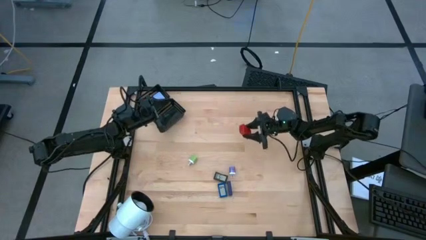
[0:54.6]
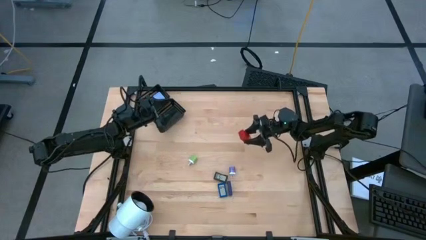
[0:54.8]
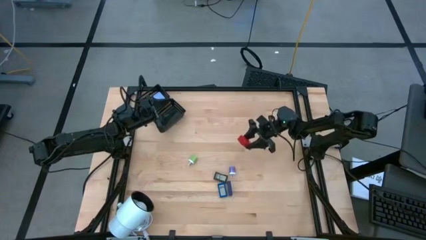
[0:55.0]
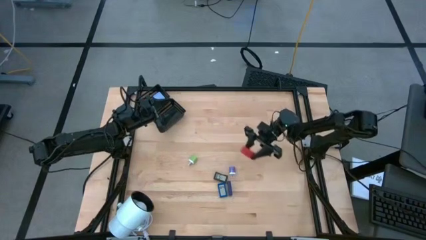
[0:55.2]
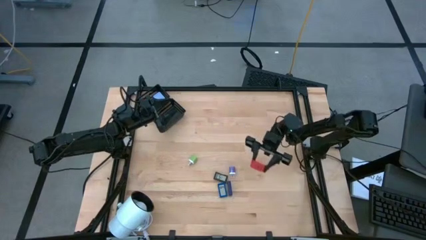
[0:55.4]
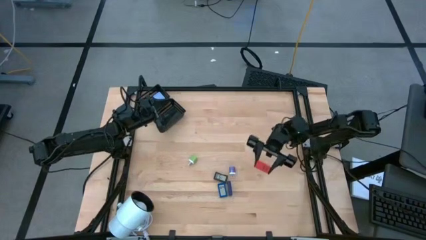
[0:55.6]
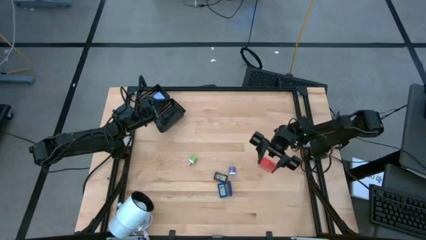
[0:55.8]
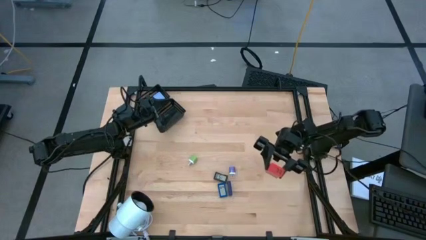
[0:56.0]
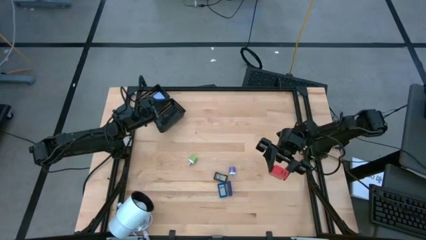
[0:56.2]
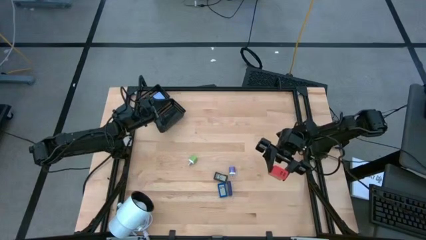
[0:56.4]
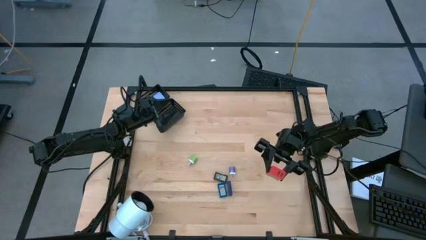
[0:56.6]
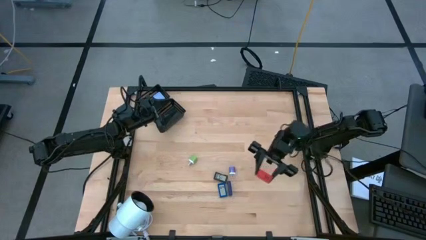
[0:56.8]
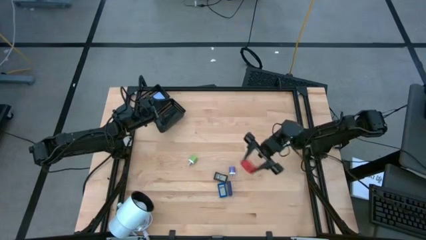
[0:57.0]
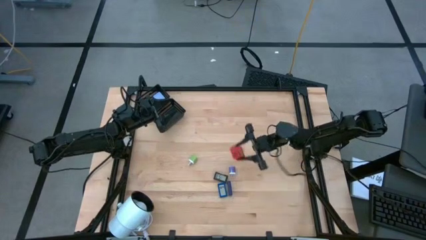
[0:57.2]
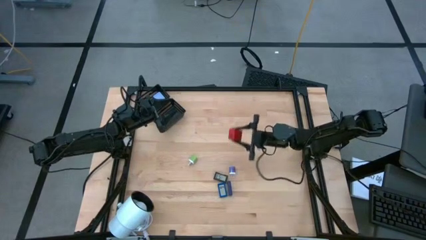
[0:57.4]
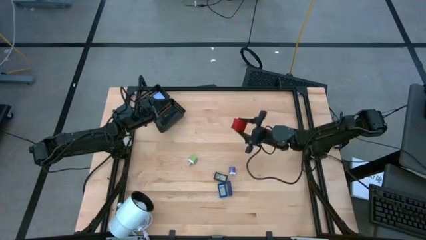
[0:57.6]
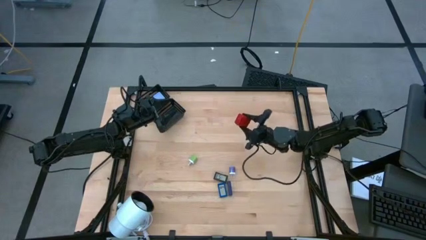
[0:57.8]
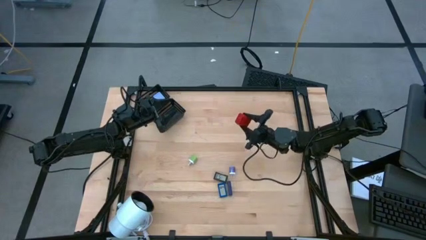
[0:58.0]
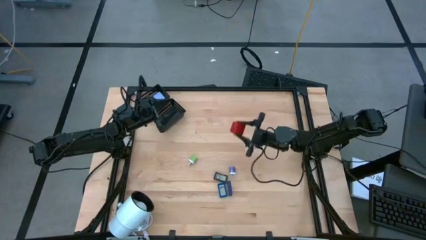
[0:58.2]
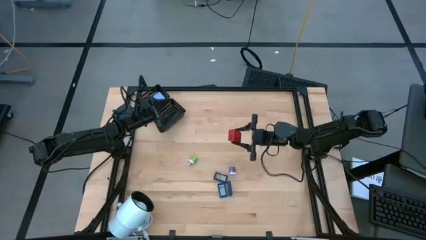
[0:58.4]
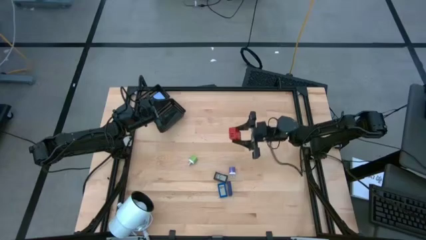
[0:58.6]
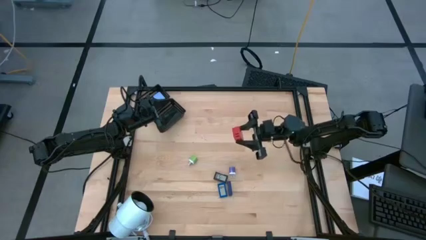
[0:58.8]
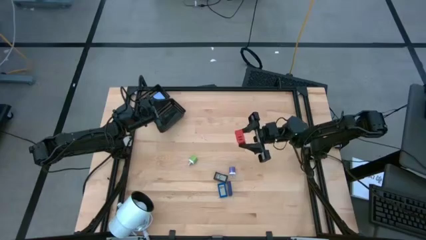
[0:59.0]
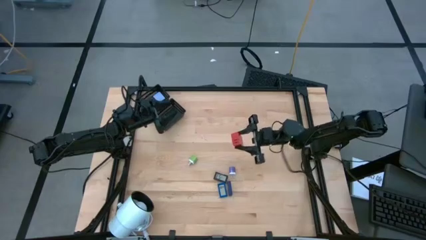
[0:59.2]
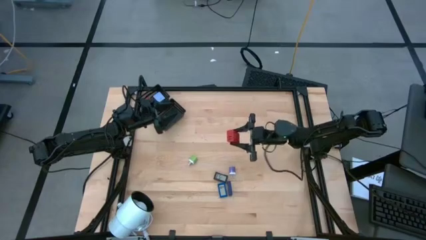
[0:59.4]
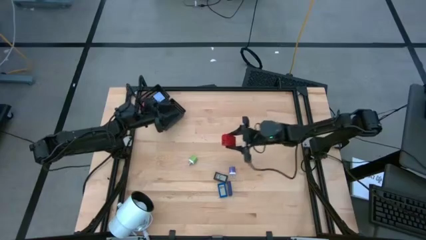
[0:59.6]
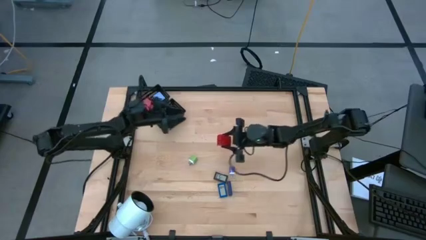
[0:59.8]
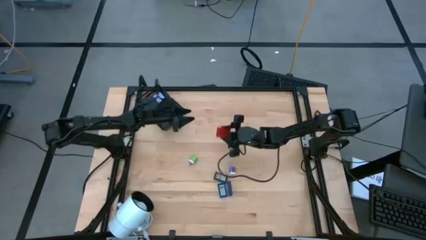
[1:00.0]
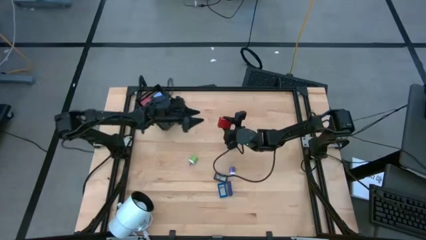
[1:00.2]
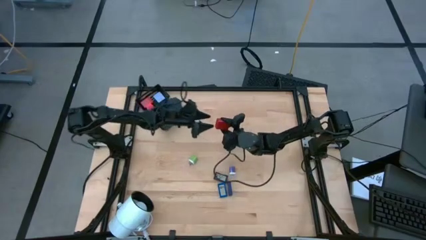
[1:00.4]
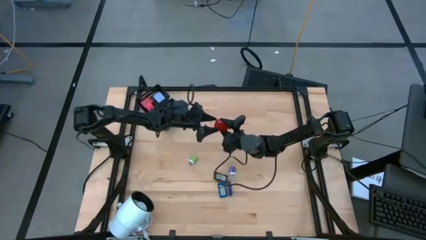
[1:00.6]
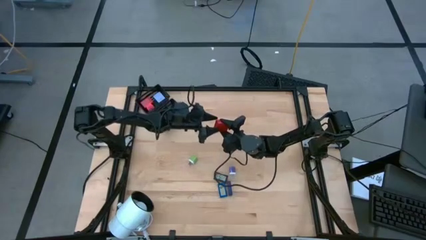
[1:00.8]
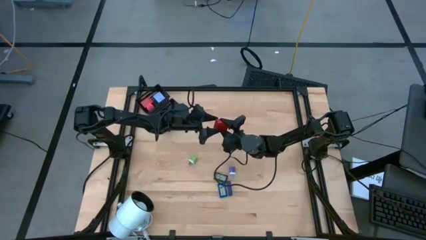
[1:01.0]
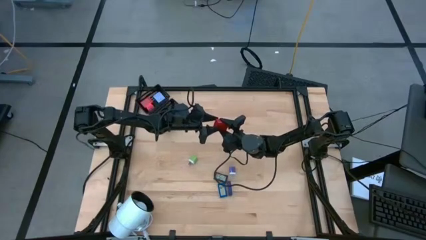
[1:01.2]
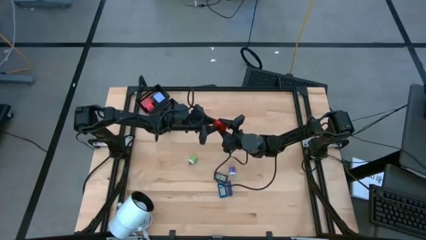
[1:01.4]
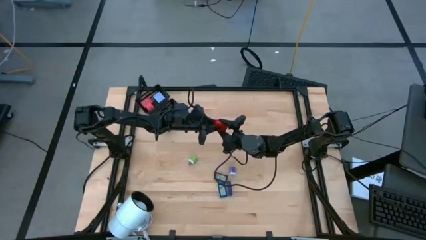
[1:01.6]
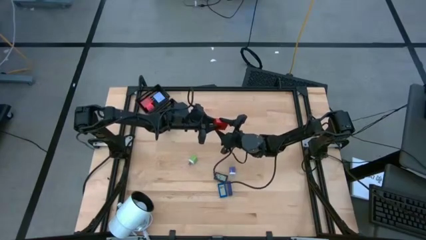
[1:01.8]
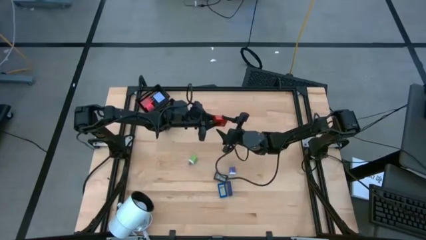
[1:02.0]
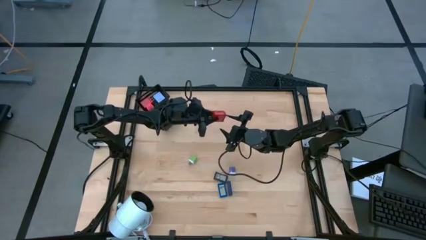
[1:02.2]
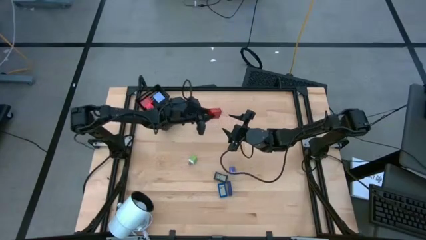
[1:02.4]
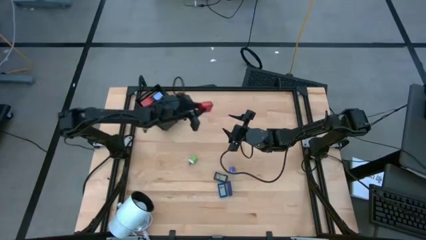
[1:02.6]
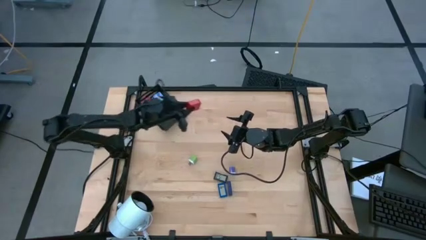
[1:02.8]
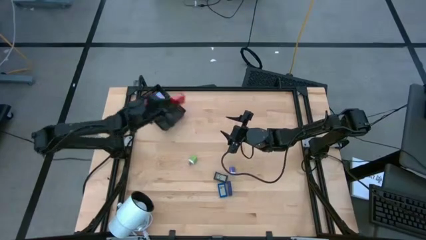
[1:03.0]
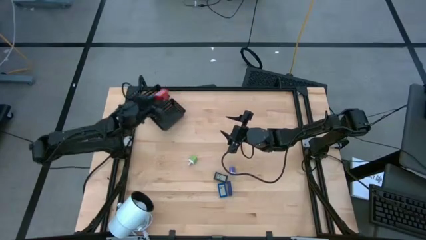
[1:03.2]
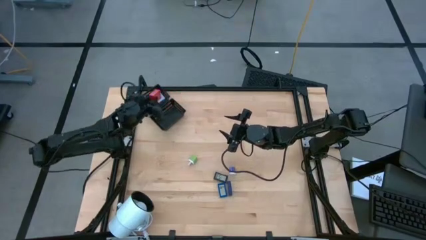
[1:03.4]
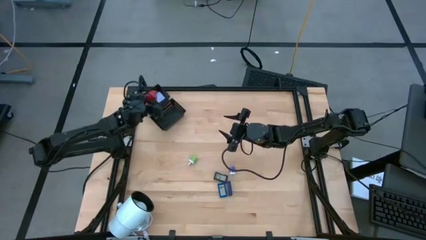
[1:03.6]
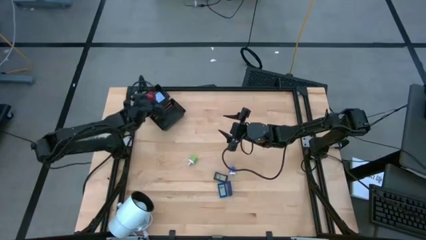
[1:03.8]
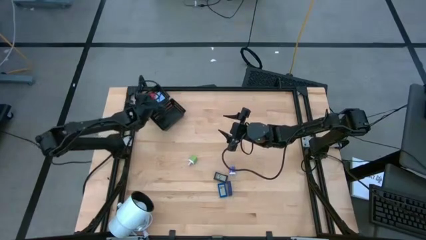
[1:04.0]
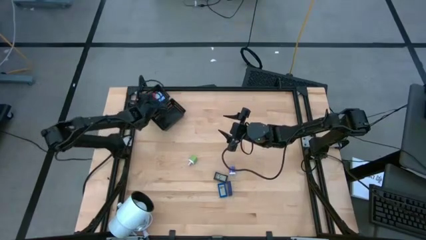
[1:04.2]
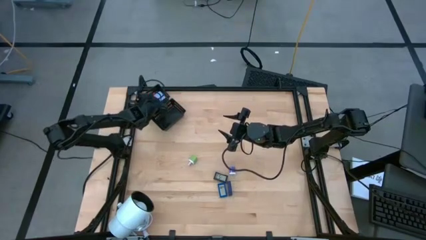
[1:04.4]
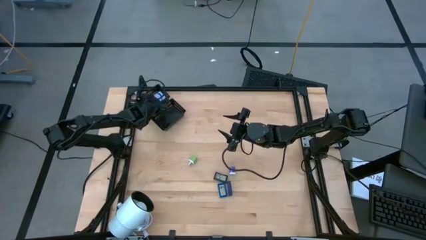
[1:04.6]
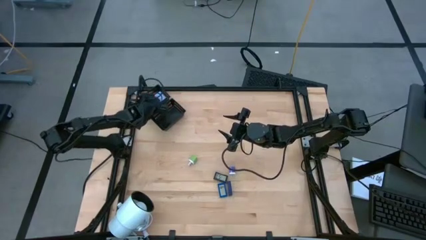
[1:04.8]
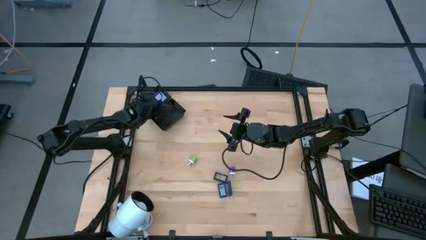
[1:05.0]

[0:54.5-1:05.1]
Task: Pick & Place Office items
Put the red charger adapter into the top black bin

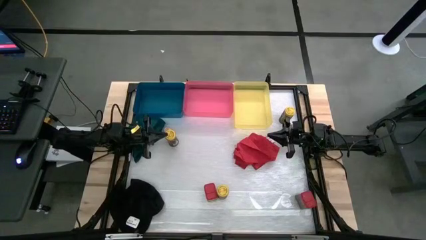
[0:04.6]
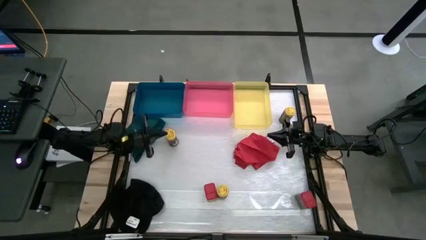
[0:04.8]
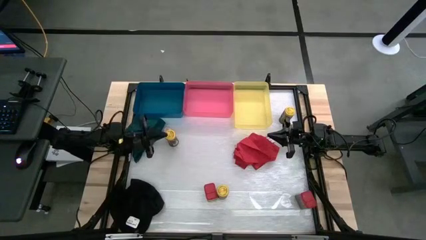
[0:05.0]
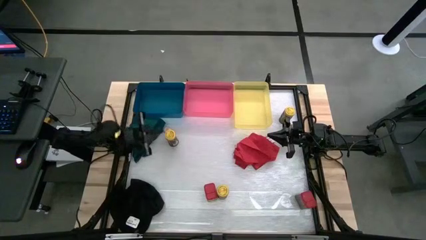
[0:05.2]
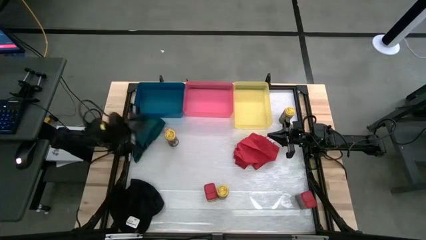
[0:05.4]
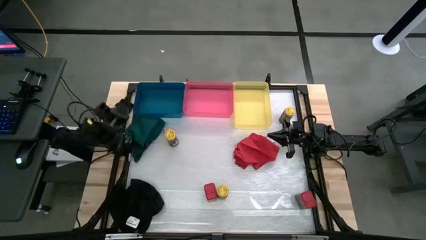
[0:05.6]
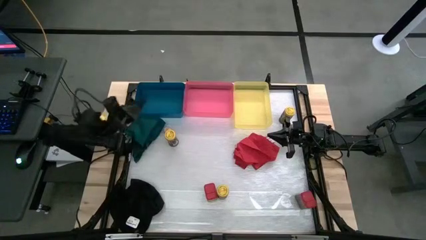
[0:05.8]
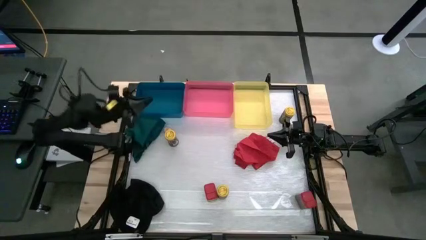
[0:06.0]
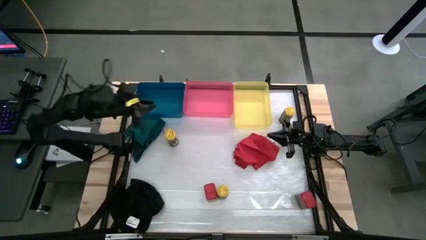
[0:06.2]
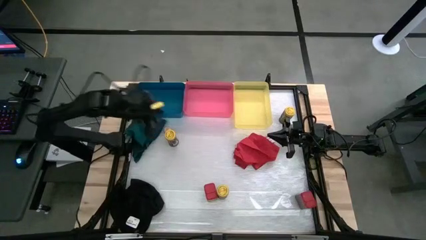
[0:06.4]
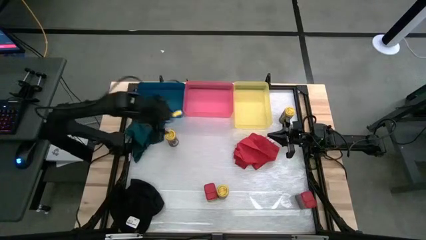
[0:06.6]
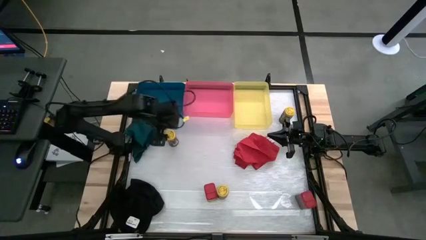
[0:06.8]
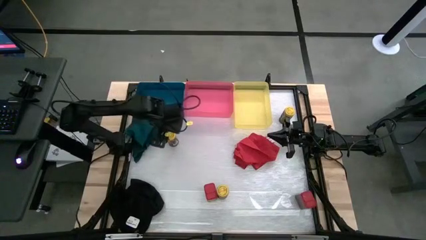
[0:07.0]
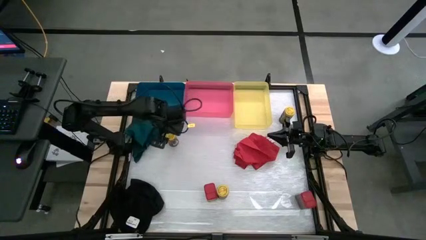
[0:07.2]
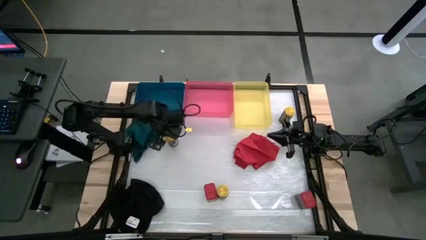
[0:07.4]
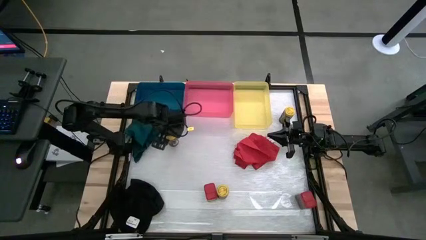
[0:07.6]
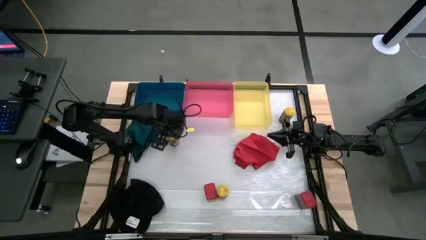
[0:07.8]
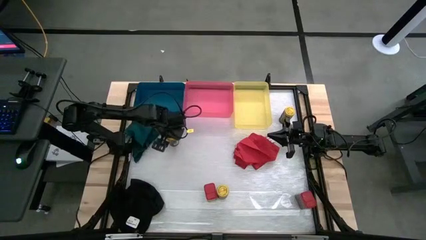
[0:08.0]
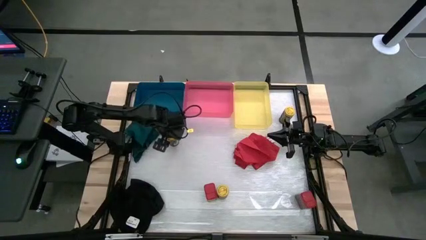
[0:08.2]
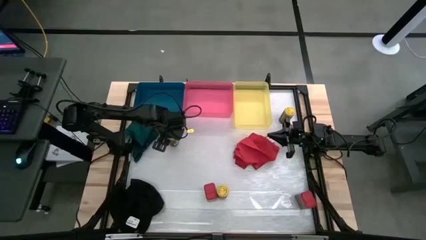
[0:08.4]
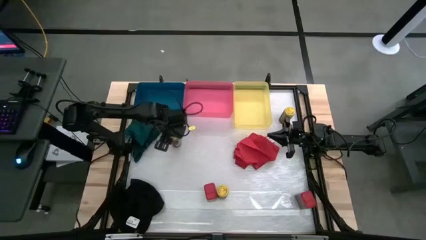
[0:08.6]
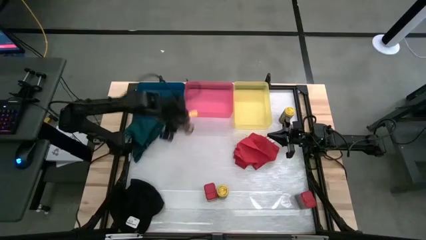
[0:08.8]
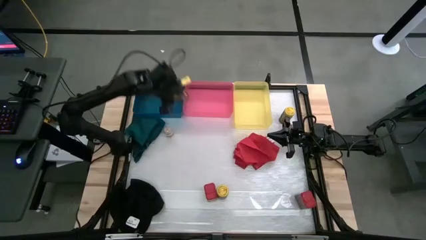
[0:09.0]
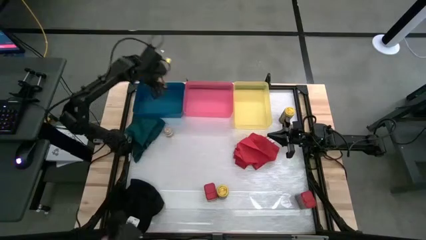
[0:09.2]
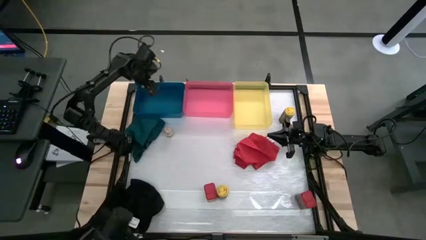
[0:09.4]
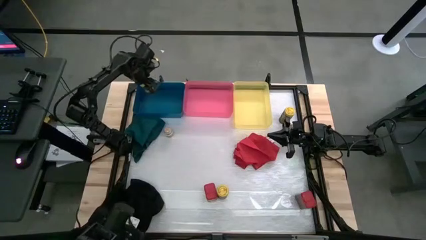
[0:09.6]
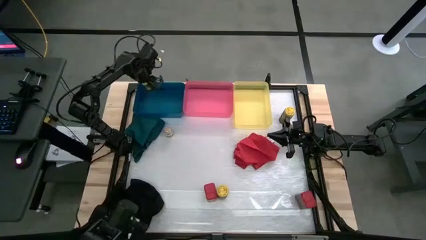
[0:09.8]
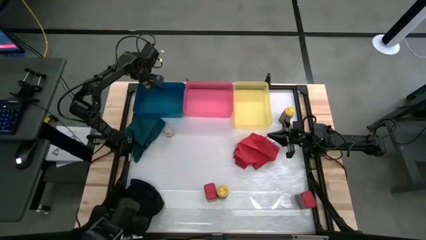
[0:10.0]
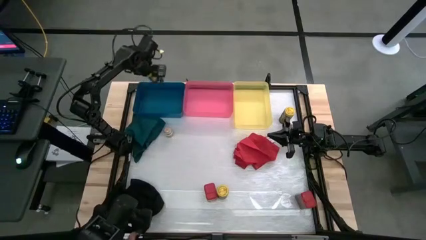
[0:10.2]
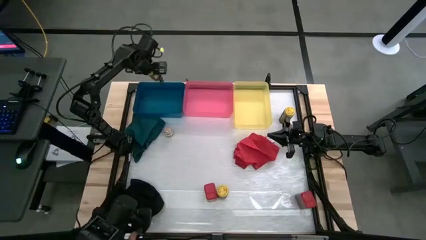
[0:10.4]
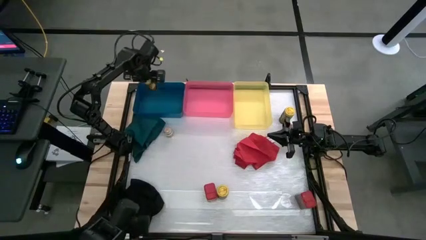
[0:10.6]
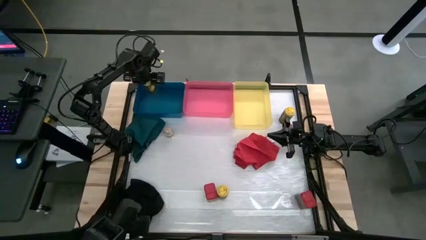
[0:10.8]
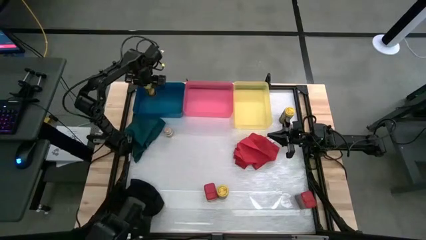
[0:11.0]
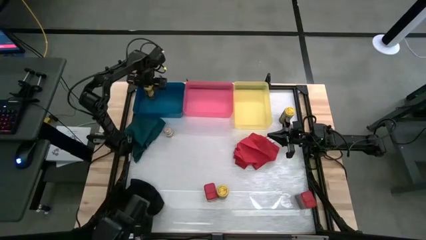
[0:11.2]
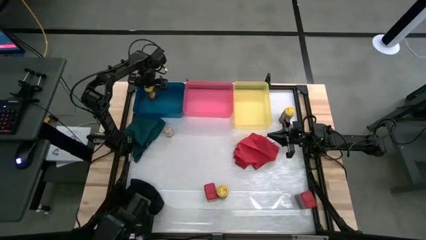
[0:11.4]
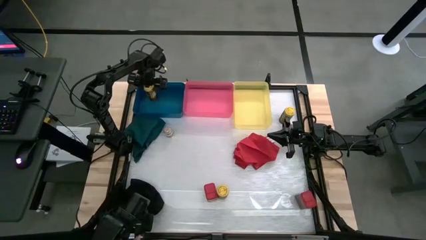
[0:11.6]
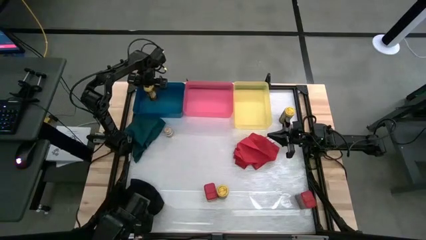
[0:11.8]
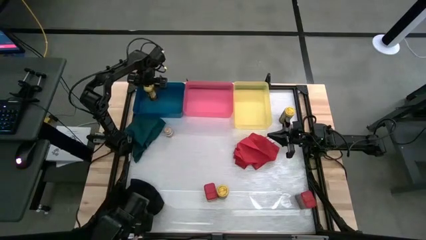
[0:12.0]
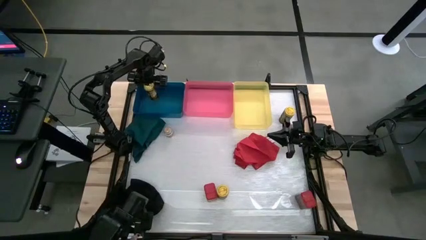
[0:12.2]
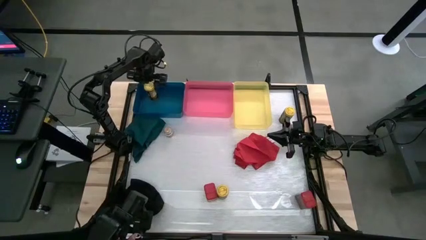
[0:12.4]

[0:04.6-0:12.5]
Task: Sort spices by type
Put the top left yellow seasoning bottle into the blue bin
